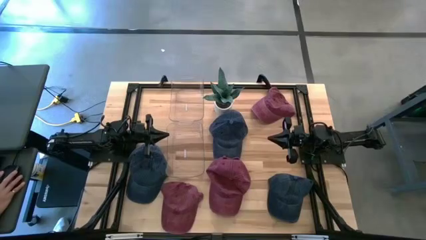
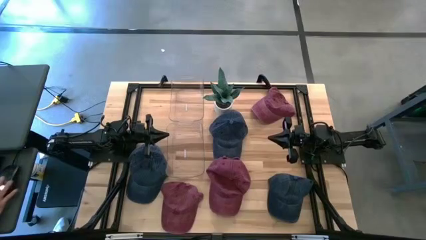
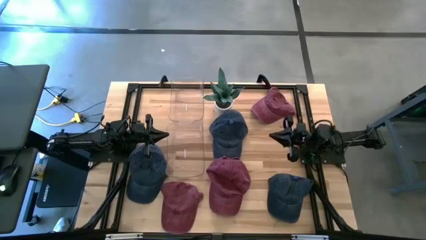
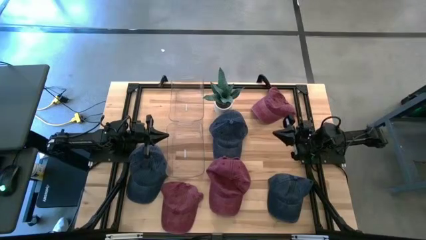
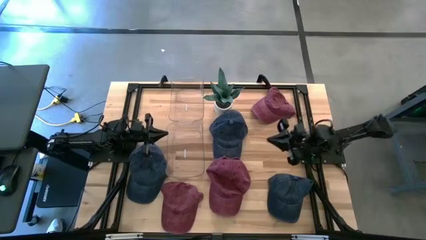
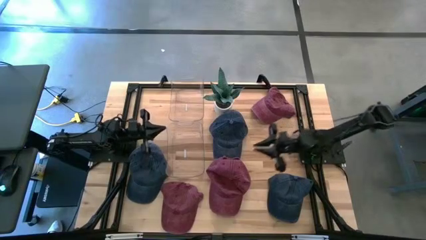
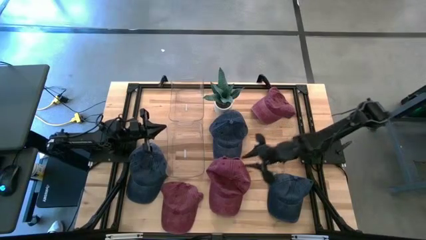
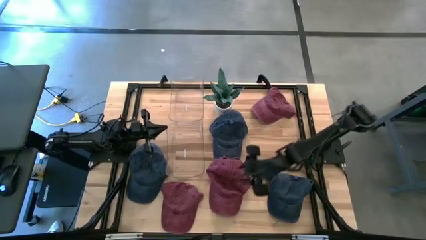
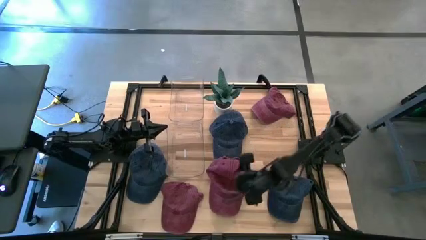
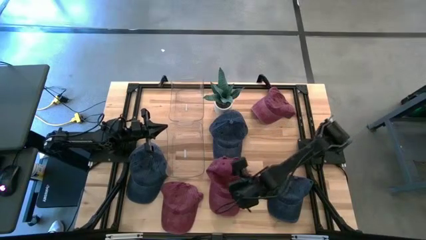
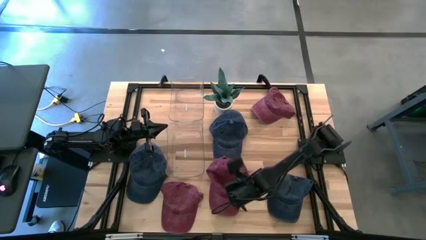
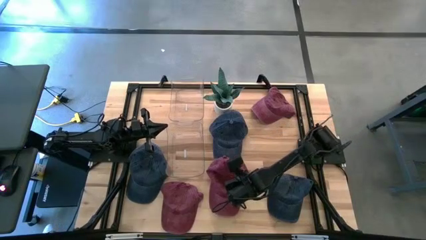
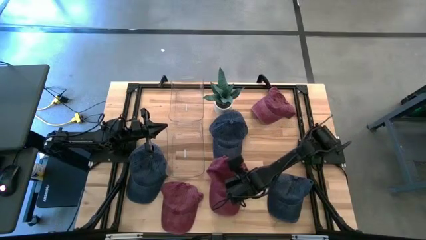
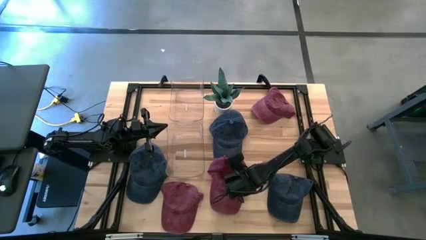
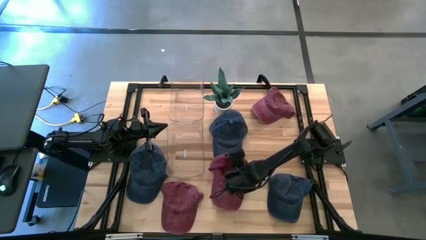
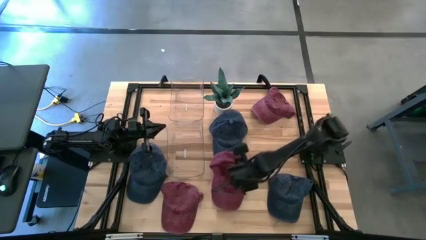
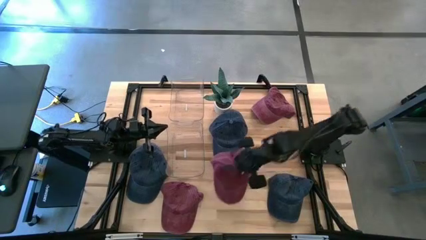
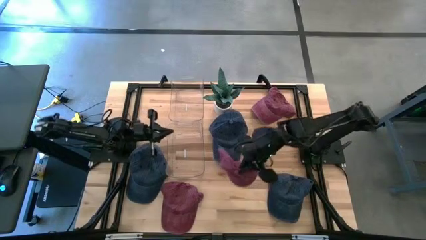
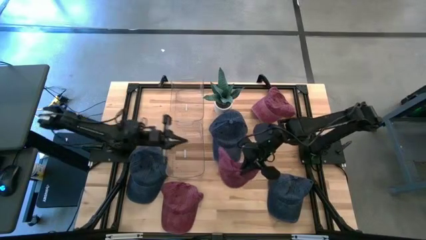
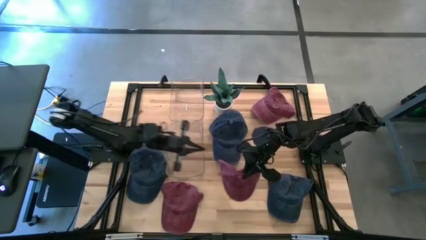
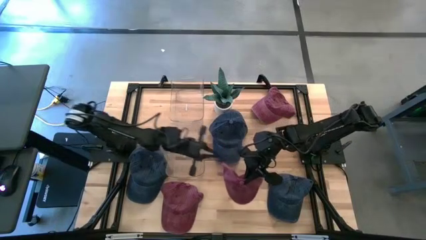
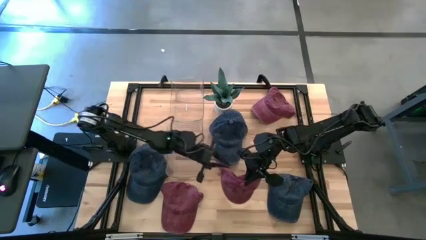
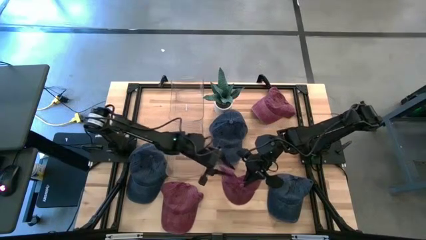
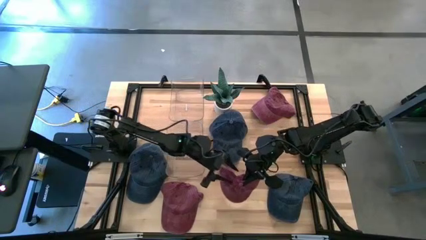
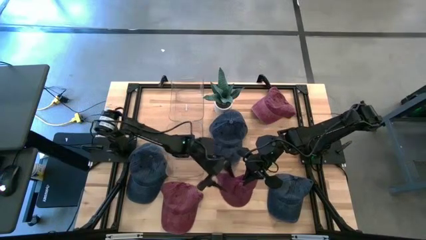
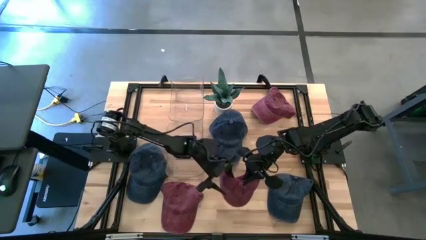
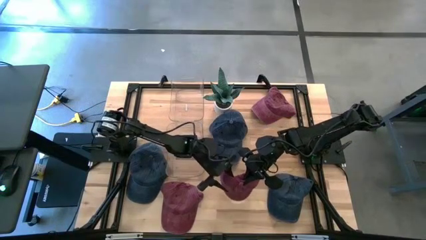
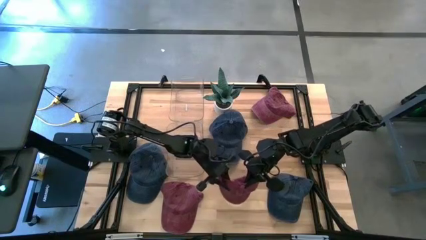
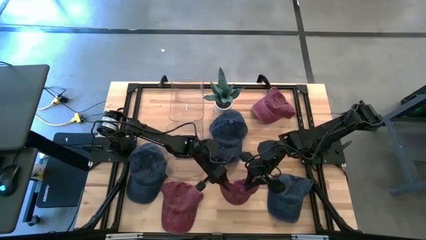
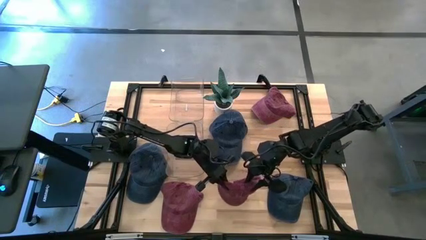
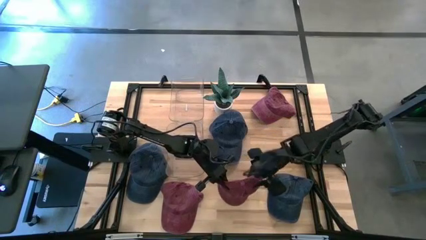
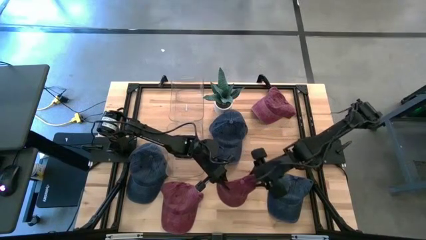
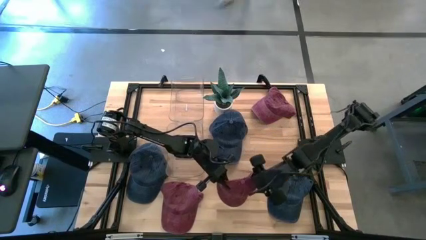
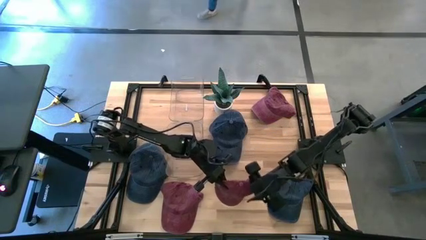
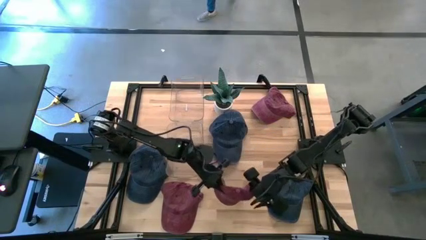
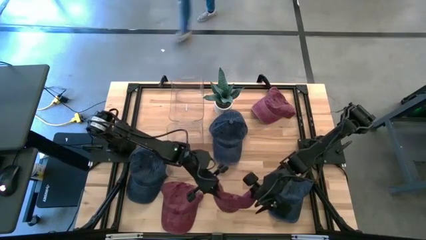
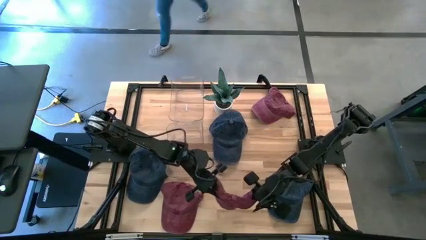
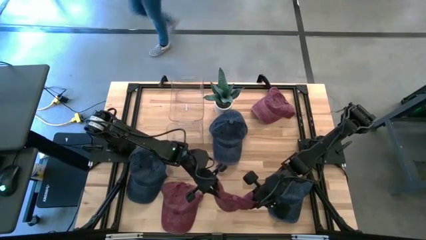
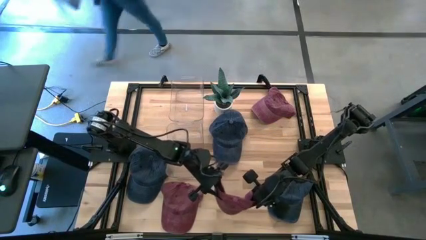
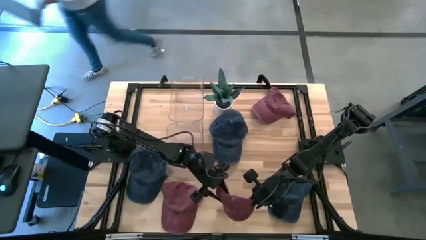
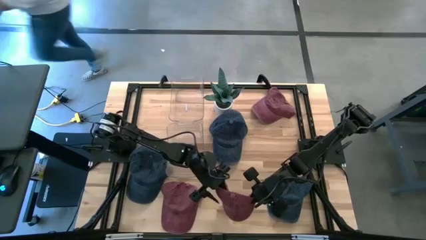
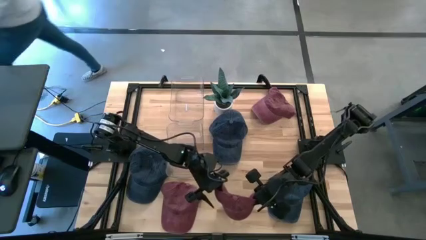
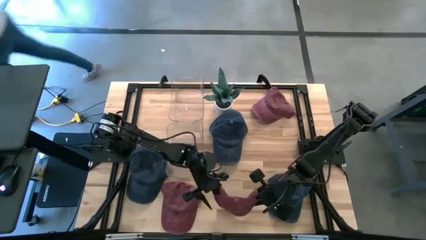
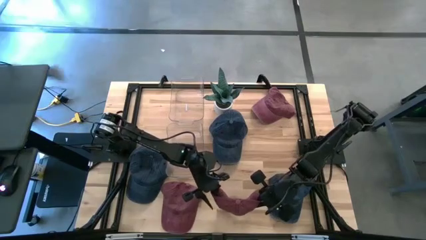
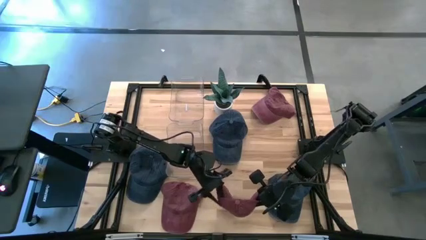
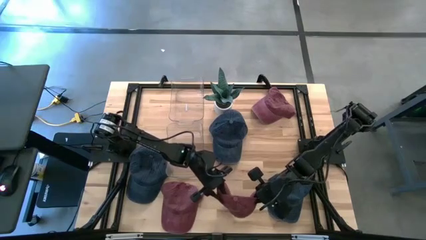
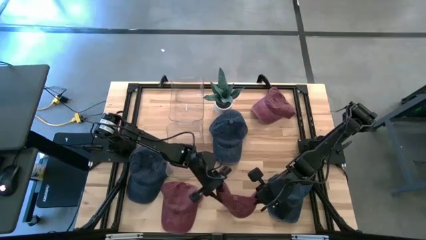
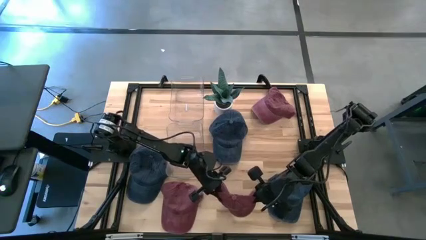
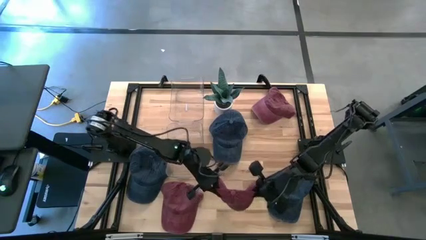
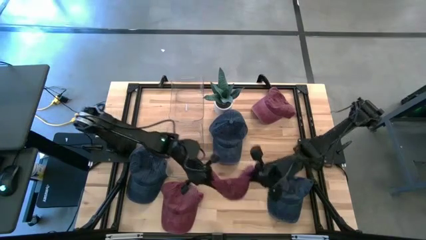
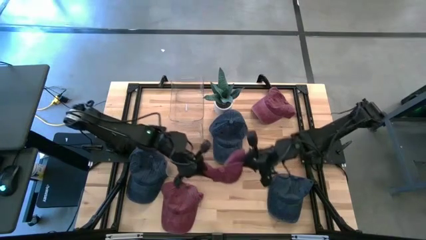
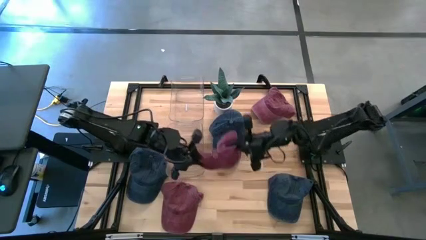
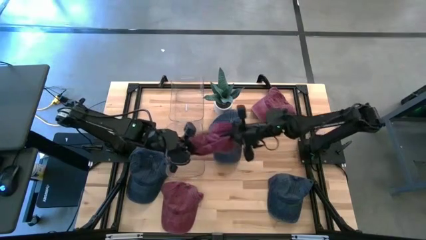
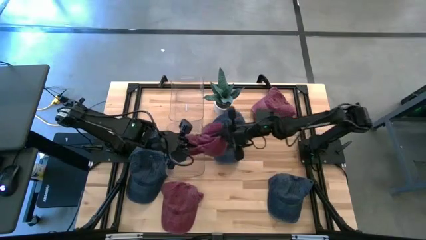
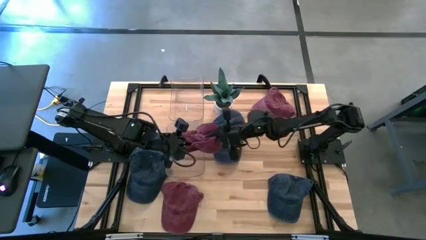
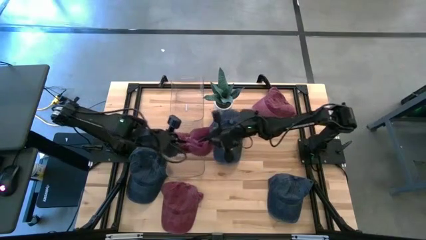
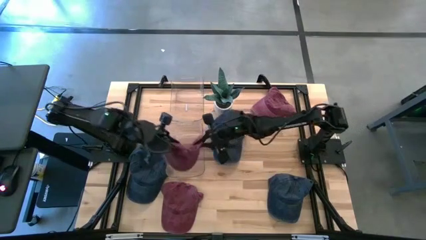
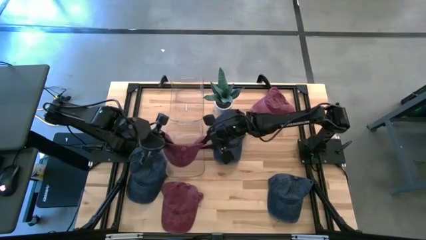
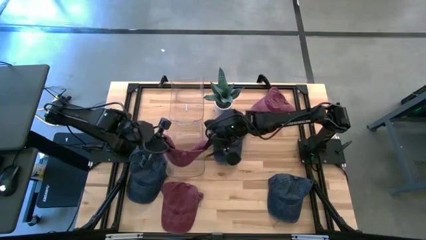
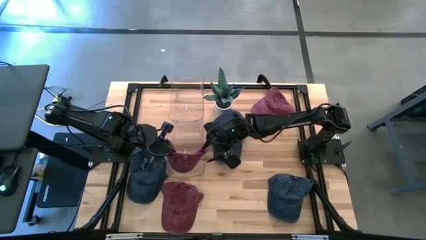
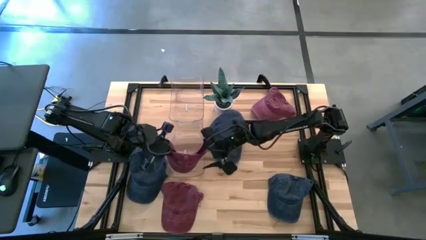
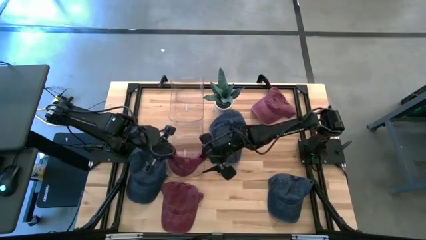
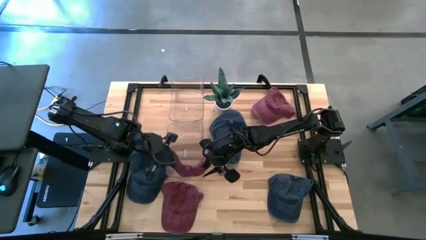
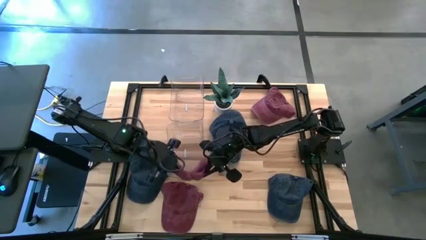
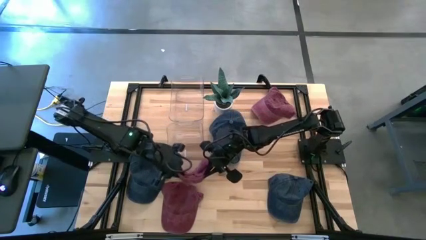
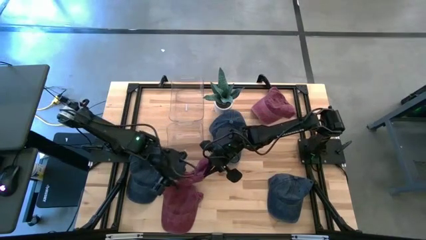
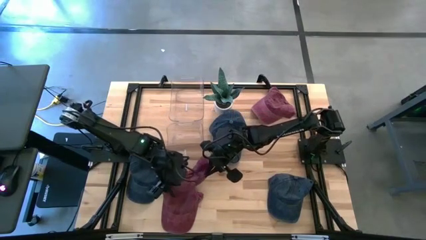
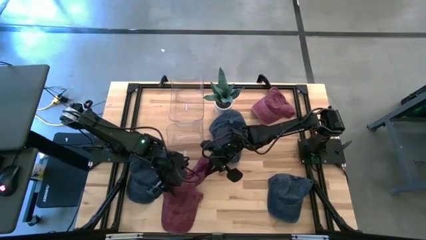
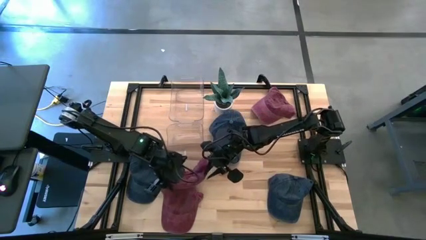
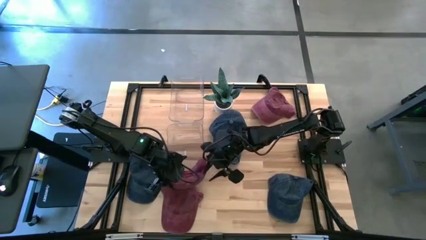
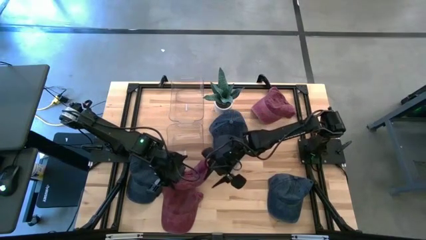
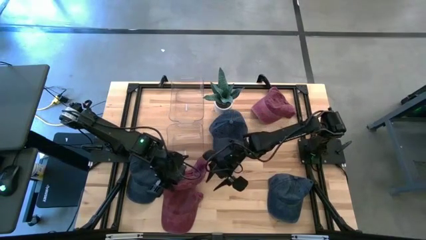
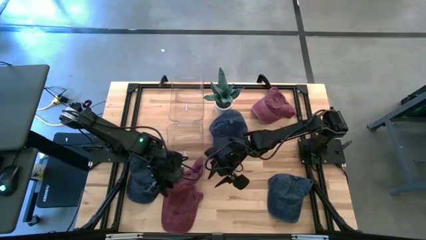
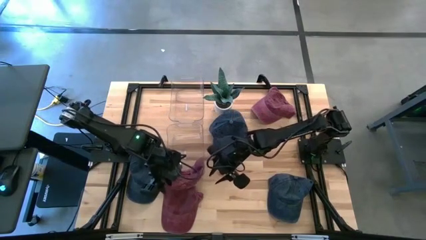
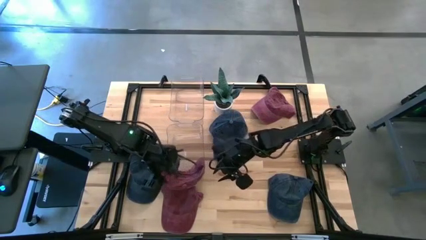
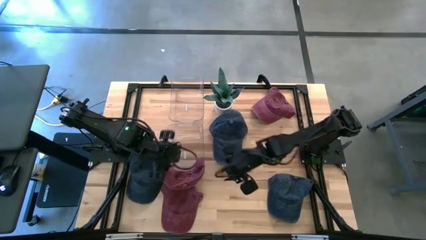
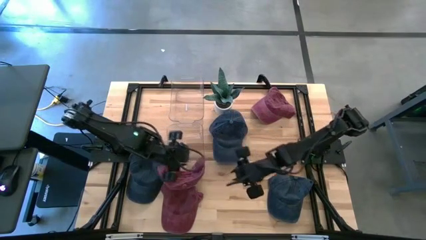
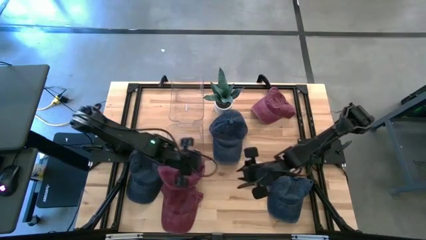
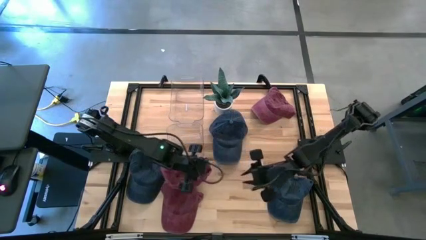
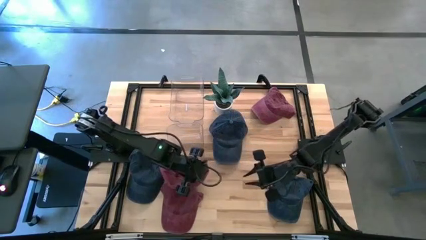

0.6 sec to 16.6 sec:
Task: Pick & Place hat
Put the bottom right red cap into the bottom transparent bin

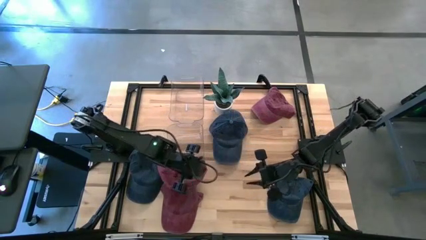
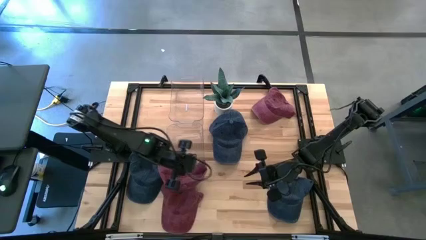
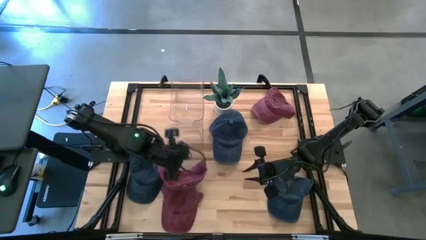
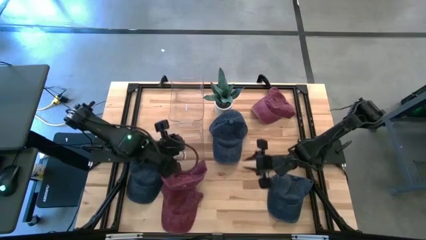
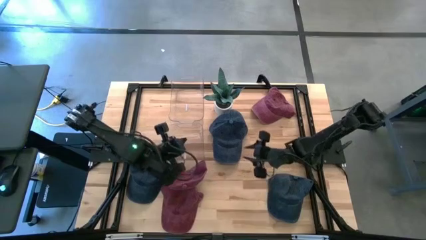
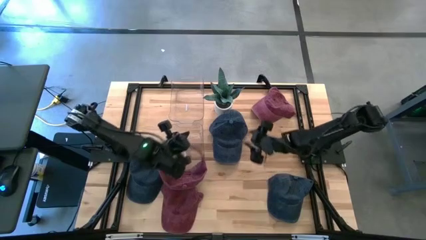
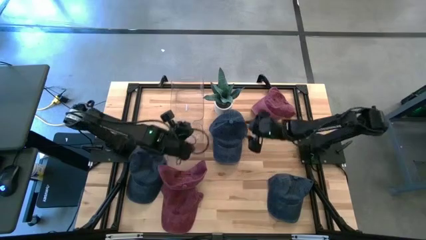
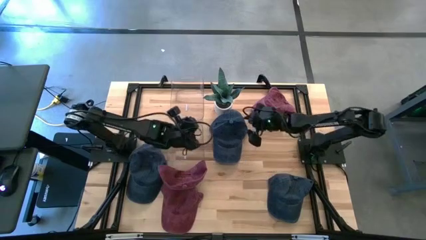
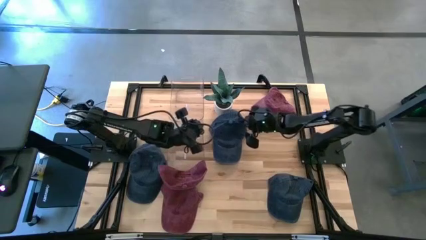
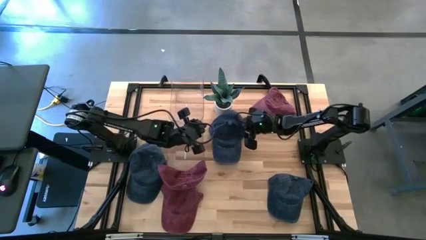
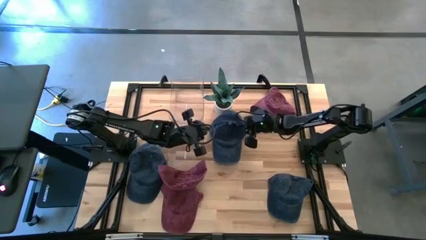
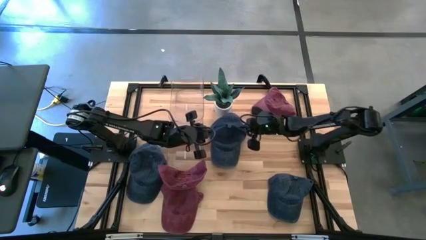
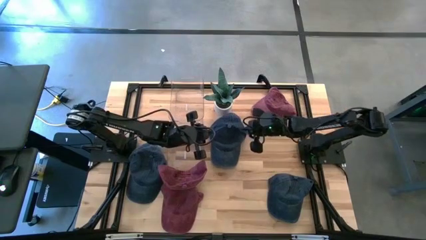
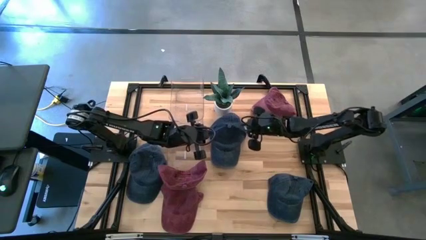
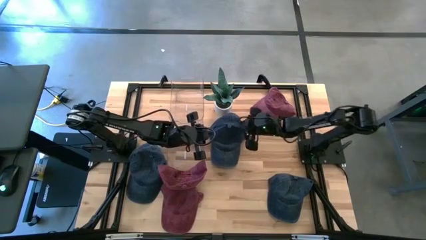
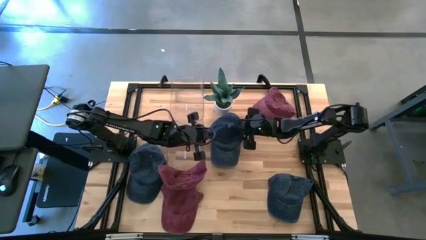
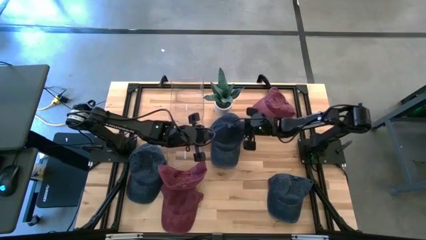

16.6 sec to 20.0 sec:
Put the top blue cap into the top transparent bin
